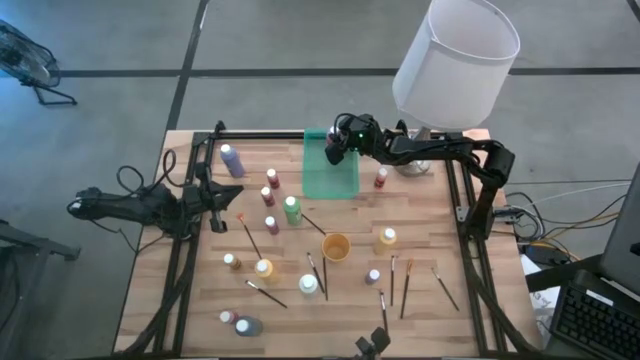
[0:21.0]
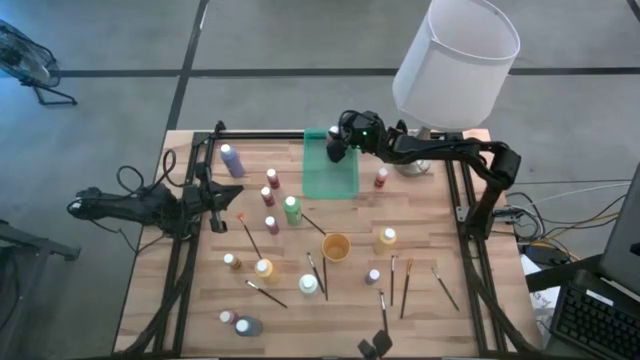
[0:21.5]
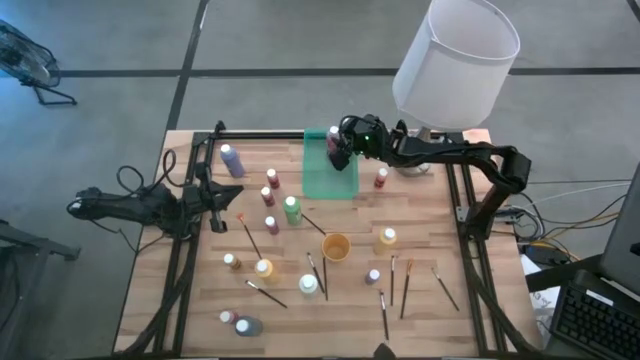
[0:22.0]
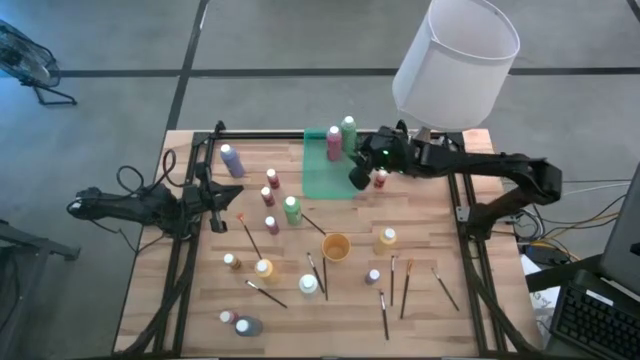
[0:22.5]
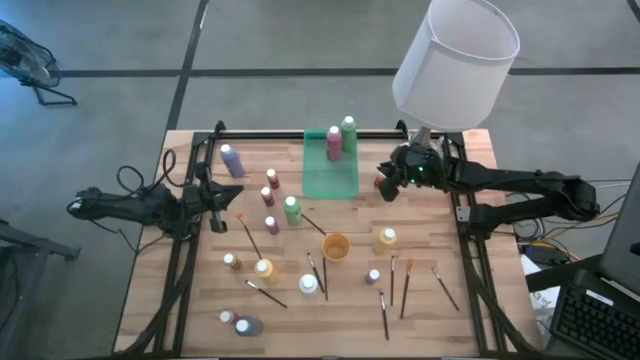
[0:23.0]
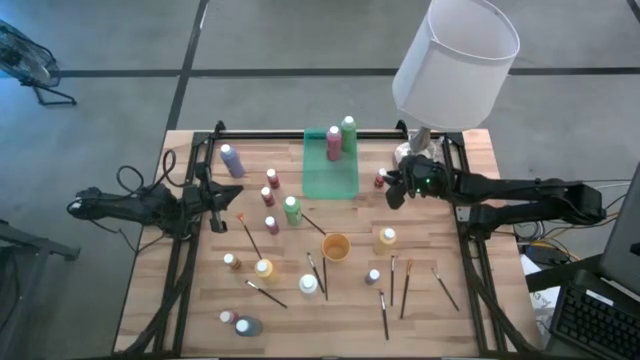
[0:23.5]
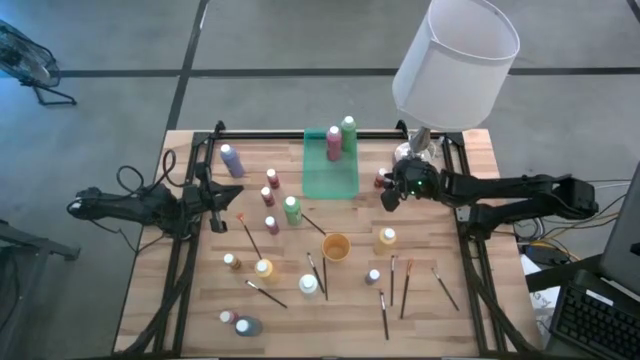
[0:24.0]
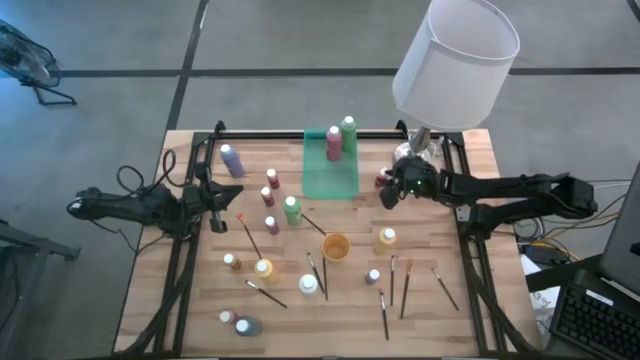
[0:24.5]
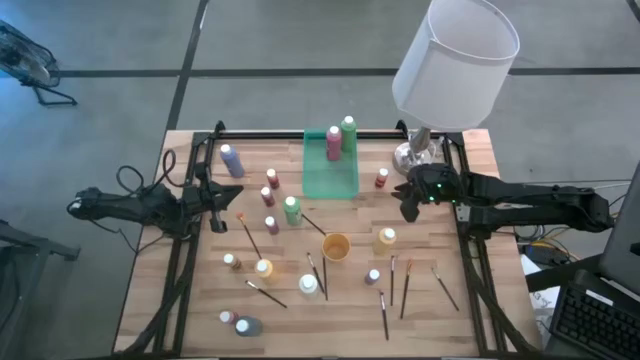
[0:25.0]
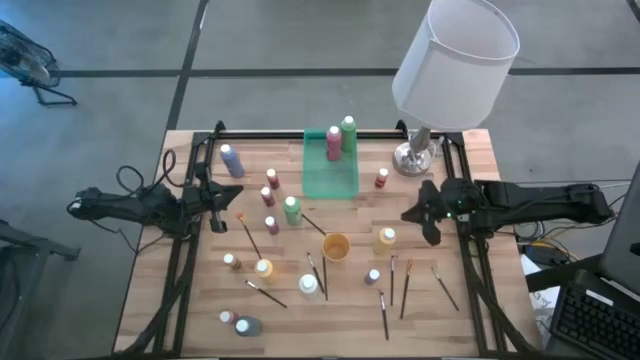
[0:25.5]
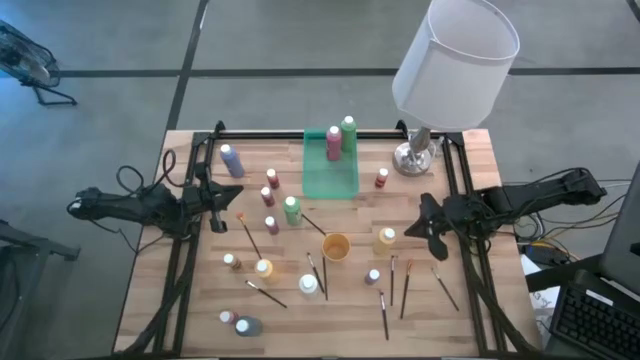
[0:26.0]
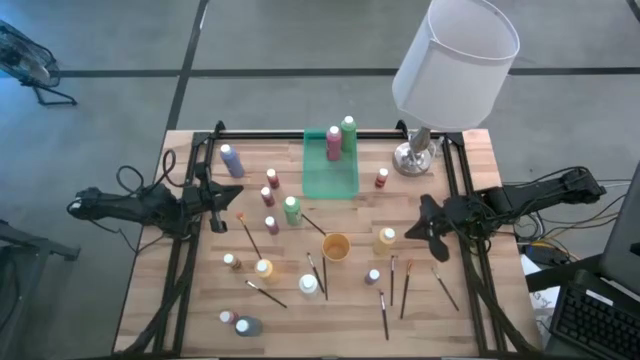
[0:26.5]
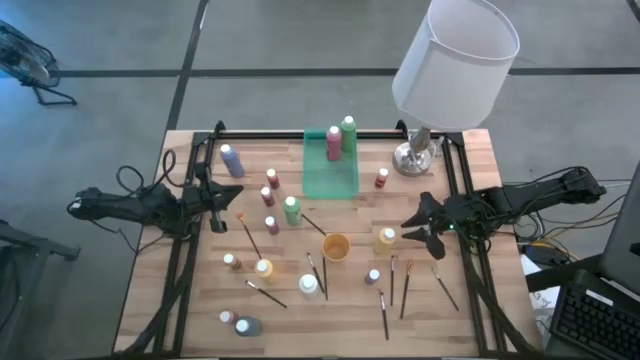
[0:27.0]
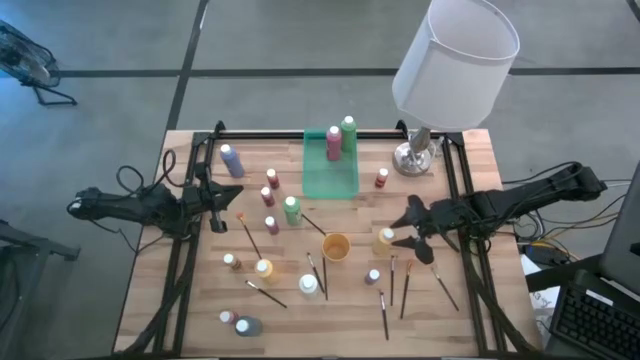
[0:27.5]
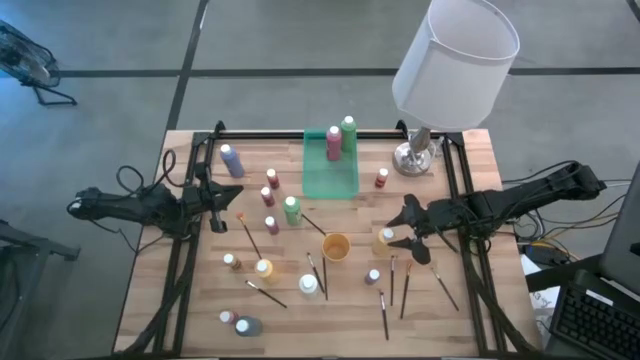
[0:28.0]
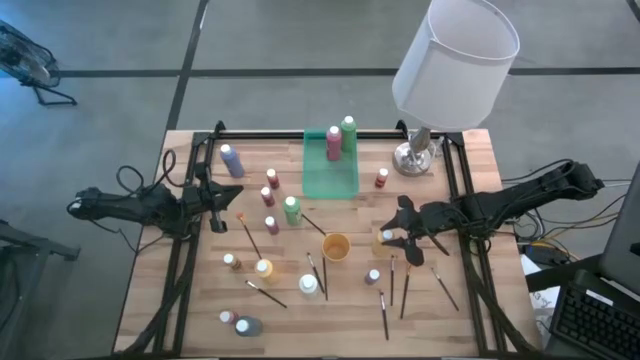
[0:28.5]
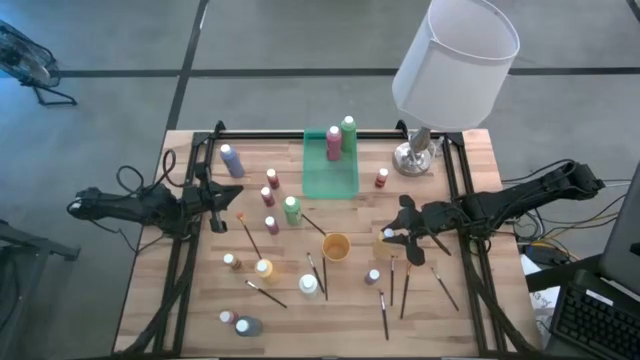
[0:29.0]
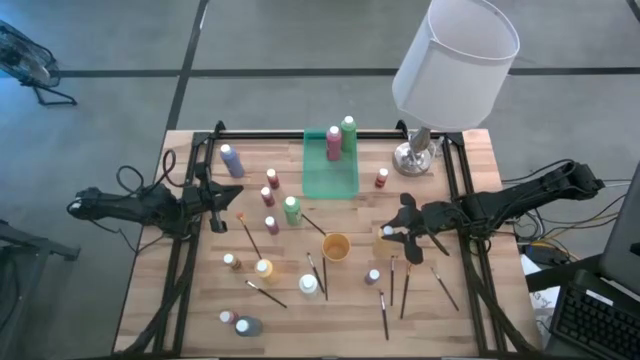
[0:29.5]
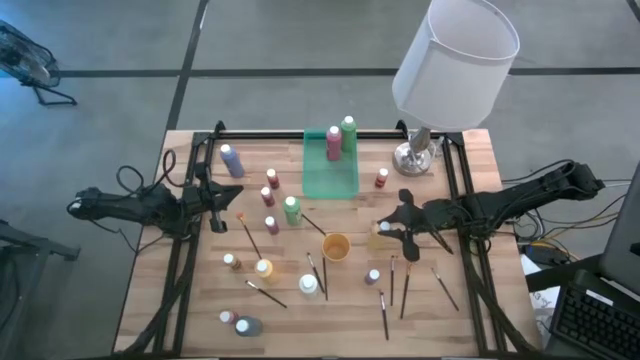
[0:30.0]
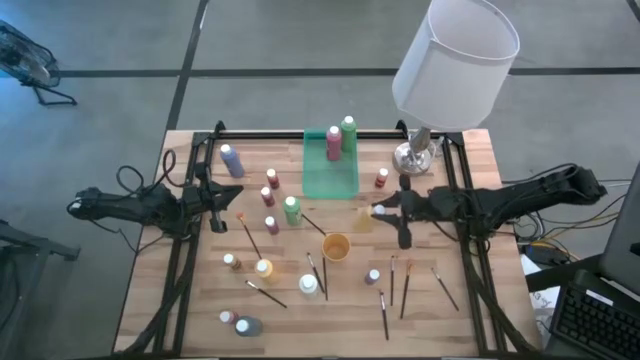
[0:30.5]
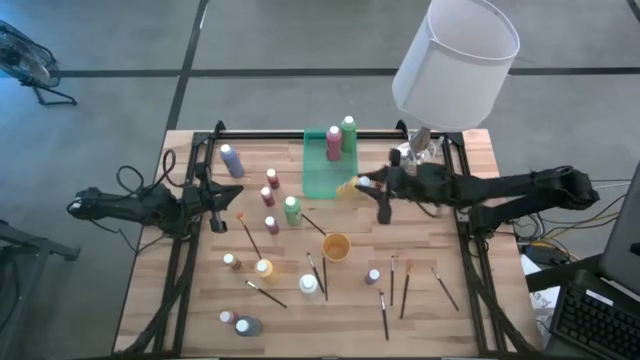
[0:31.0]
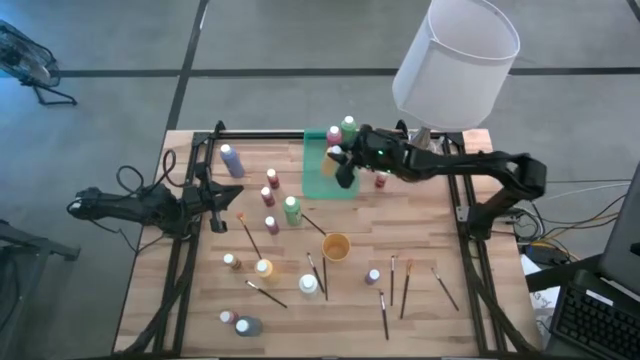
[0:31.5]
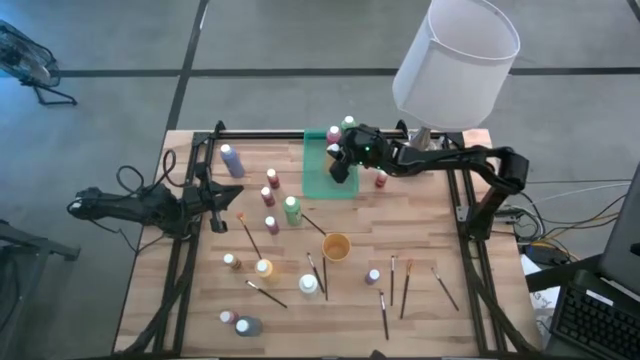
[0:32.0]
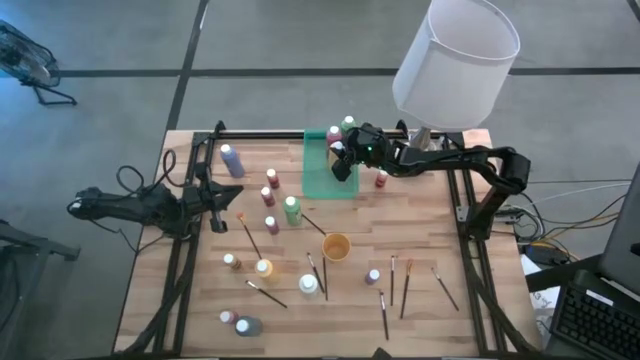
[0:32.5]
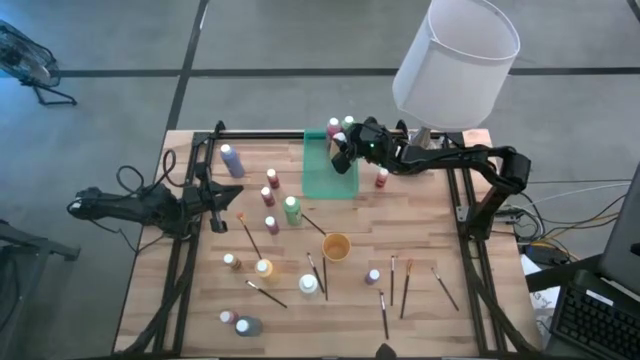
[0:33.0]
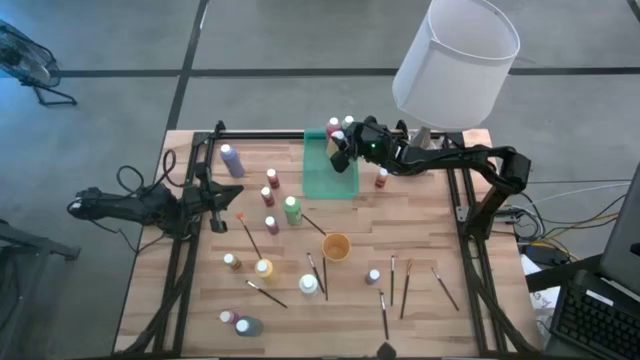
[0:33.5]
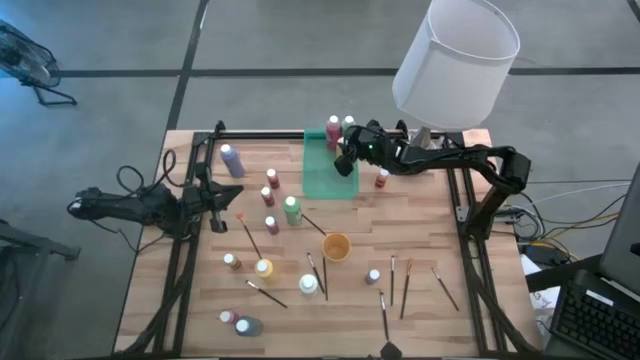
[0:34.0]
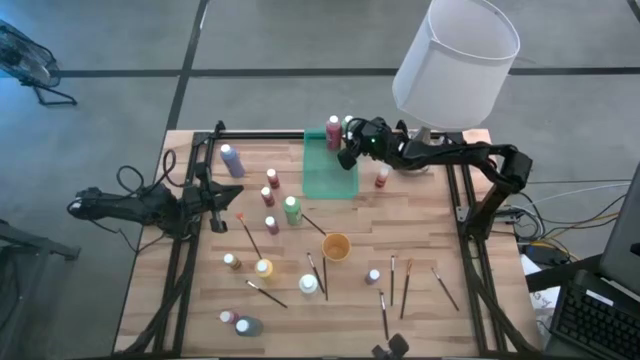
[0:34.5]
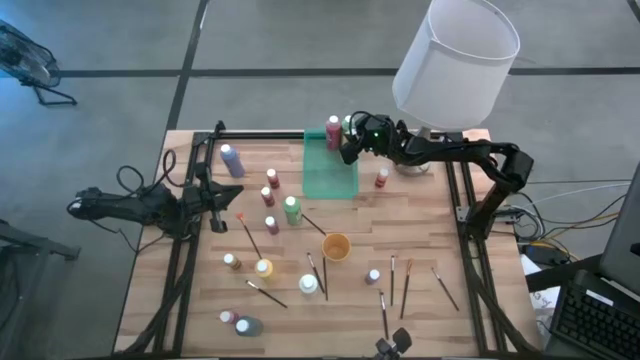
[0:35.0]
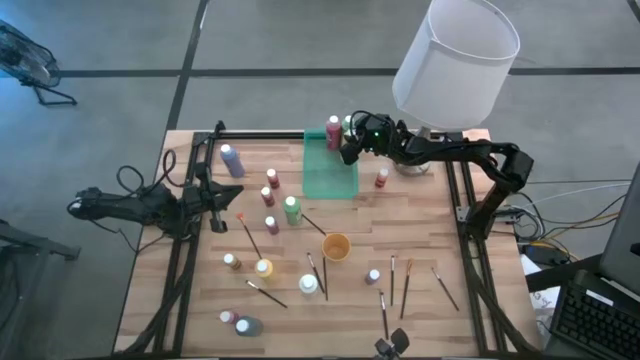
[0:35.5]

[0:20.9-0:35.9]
Task: Pick & Place Paint Supplies
Put the yellow paint bottle into the green bin

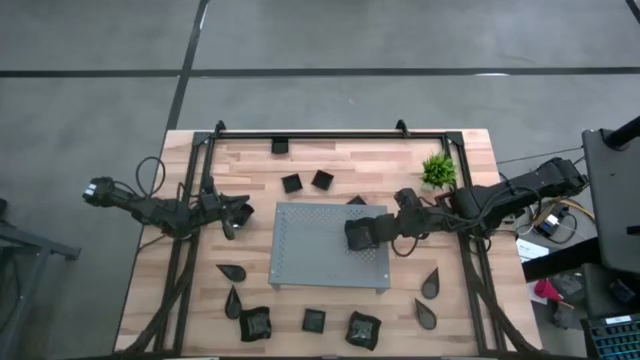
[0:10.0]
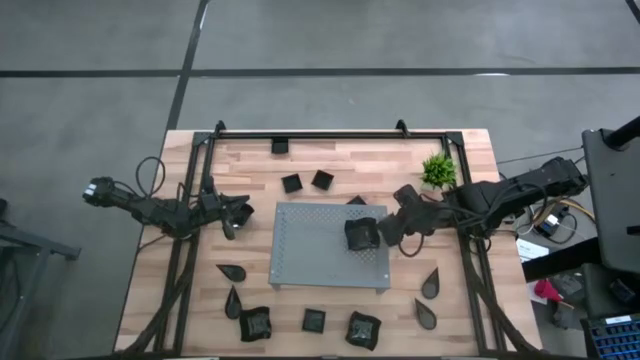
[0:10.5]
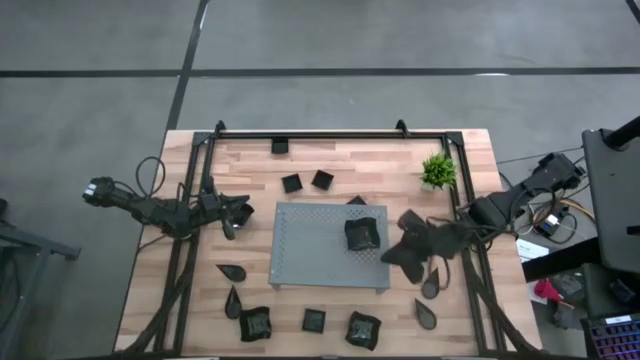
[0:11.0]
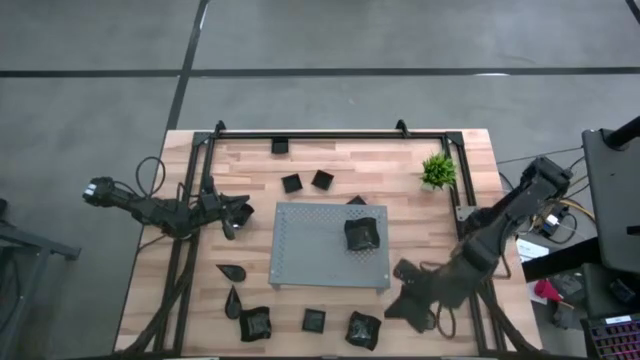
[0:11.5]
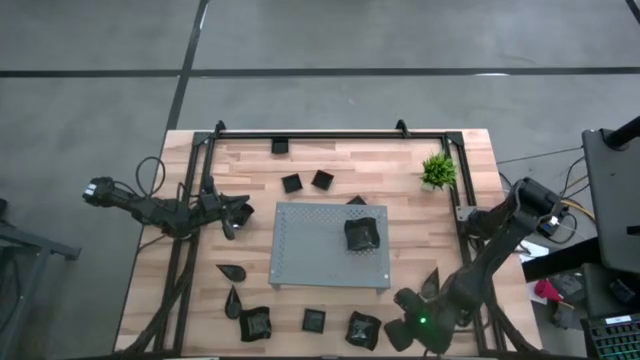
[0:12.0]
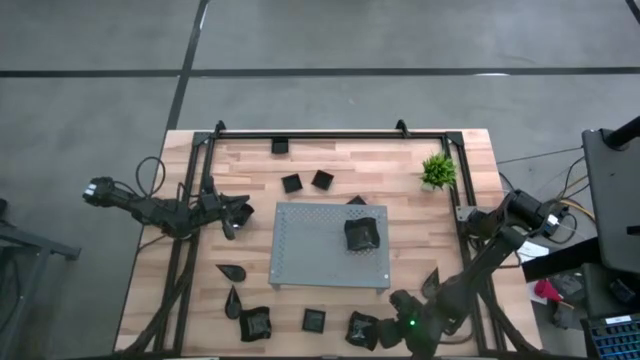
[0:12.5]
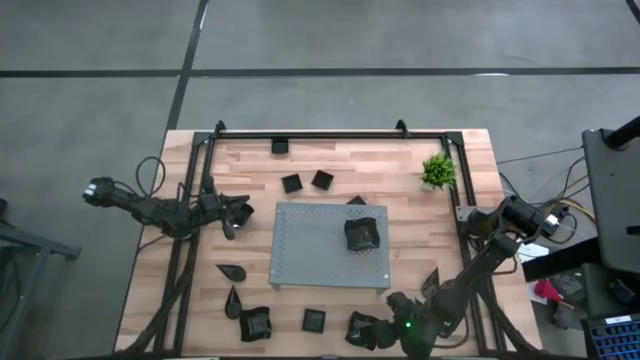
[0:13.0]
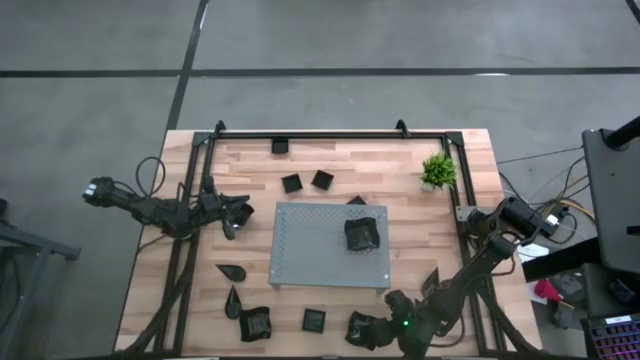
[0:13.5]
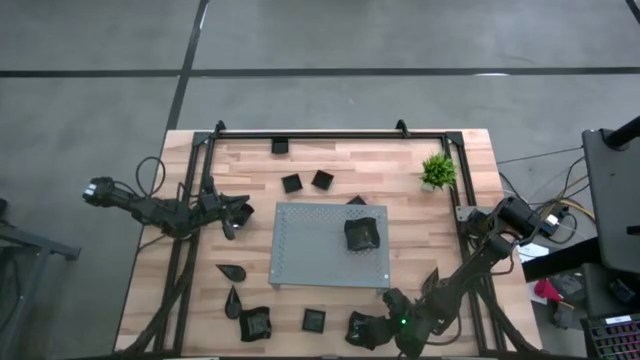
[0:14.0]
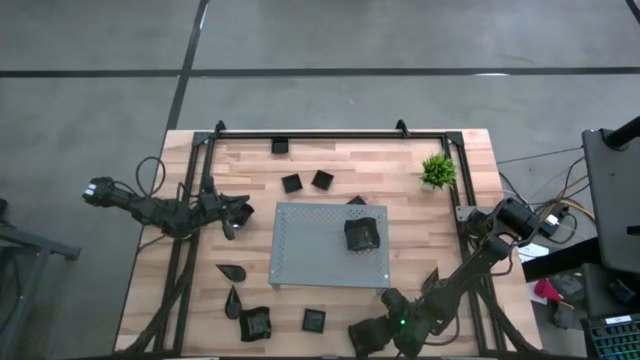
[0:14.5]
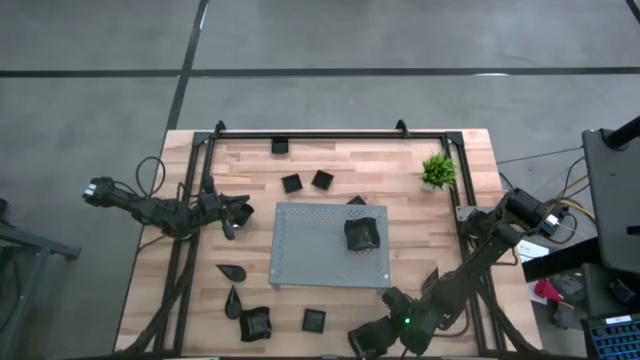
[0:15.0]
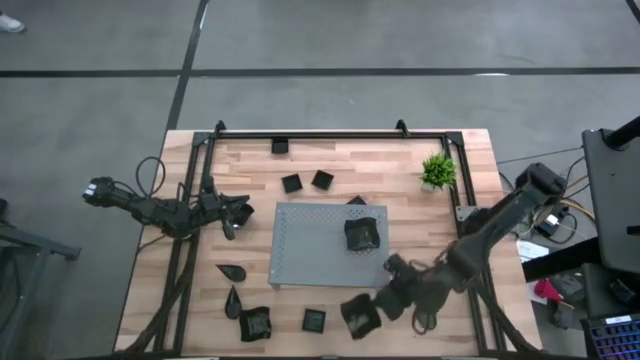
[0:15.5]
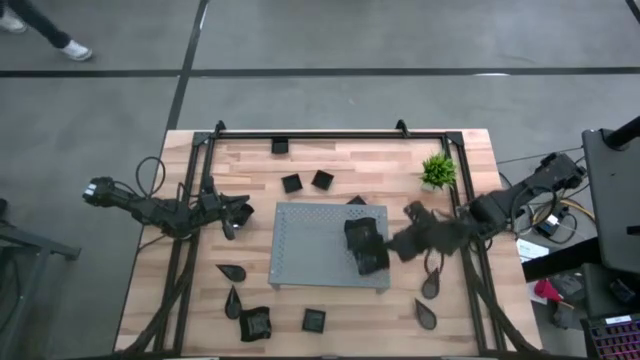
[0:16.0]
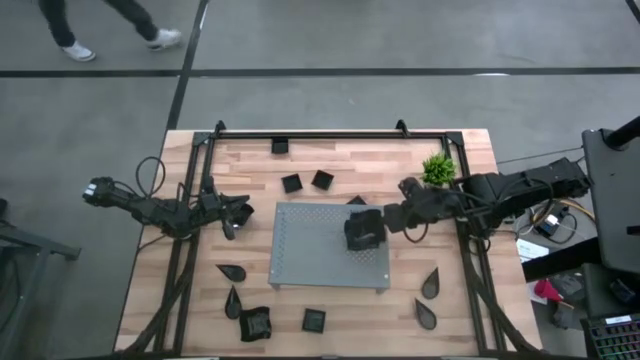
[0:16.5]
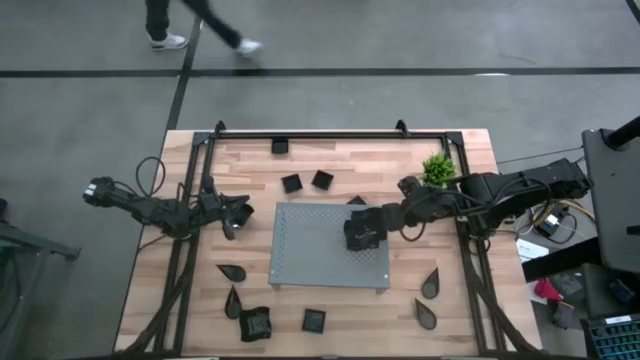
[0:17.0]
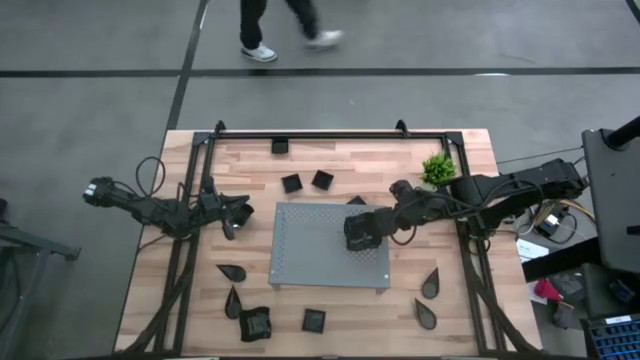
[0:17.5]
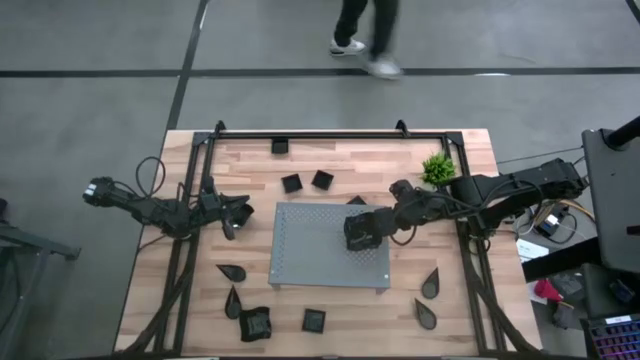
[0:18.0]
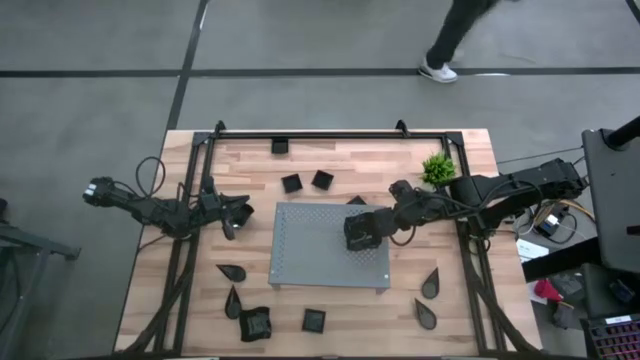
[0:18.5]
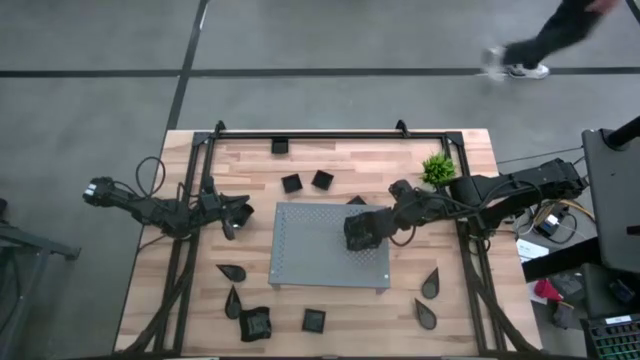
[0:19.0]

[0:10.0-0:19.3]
Task: Pick & Place Mini shaped plates
Stack the right black distorted square plate on top of the black distorted square plate on the shelf
